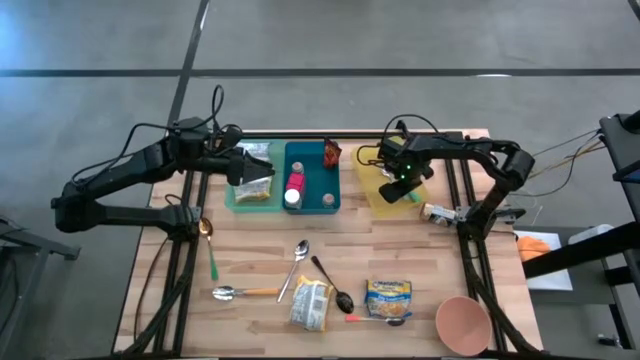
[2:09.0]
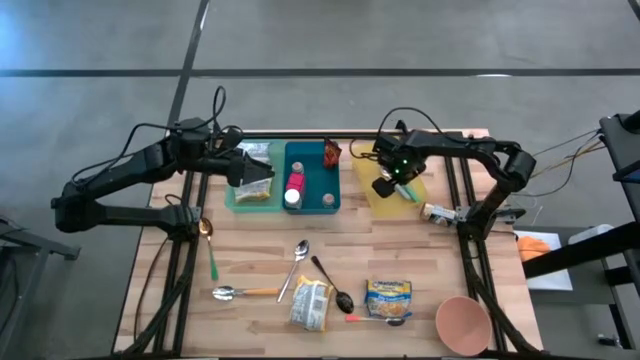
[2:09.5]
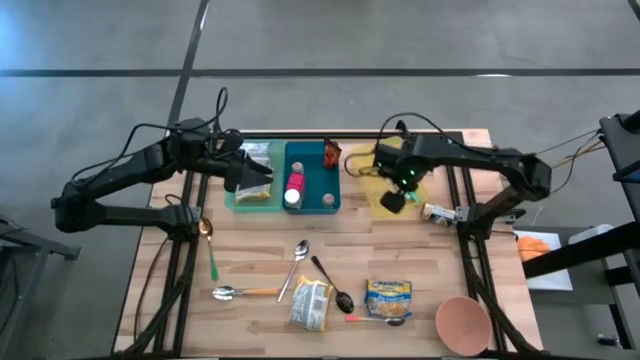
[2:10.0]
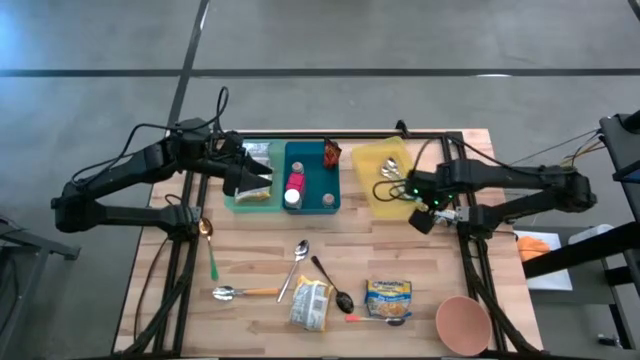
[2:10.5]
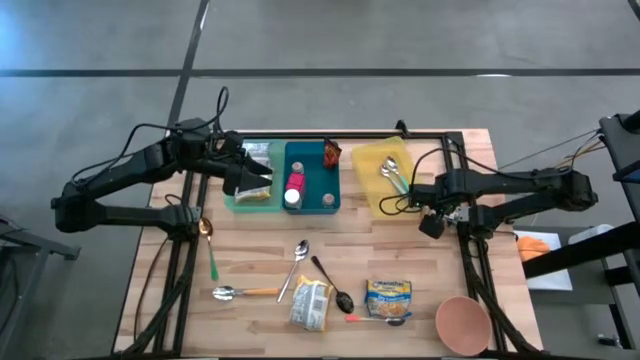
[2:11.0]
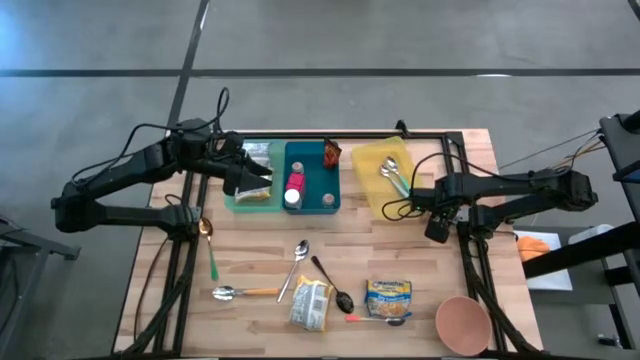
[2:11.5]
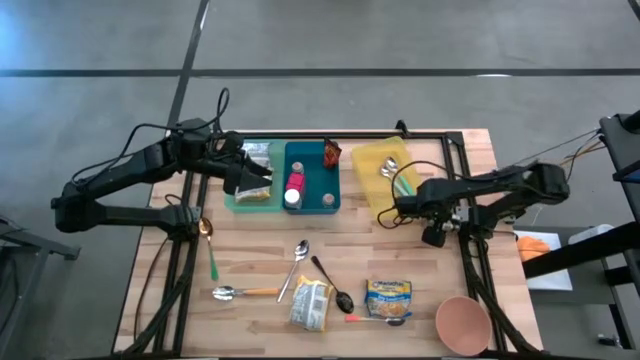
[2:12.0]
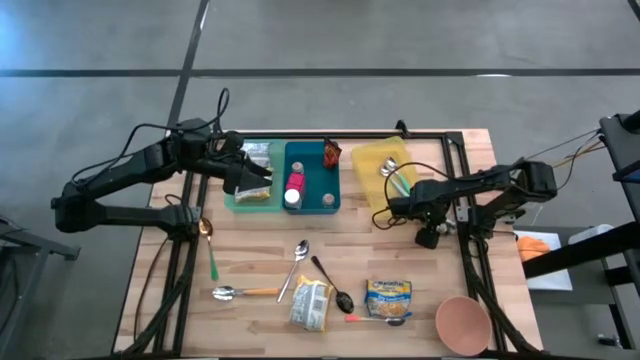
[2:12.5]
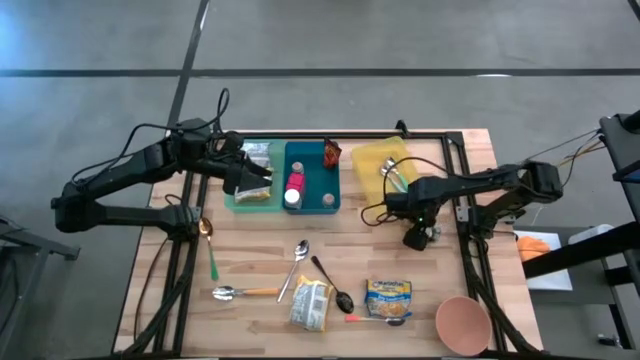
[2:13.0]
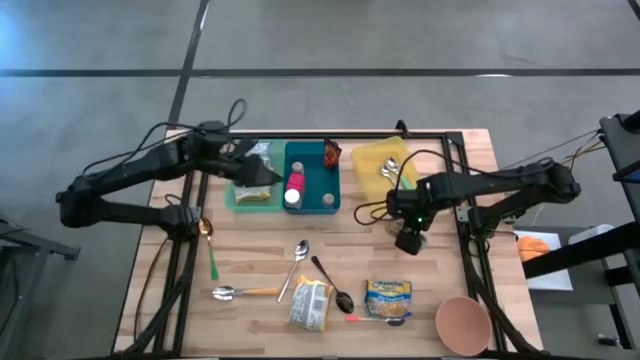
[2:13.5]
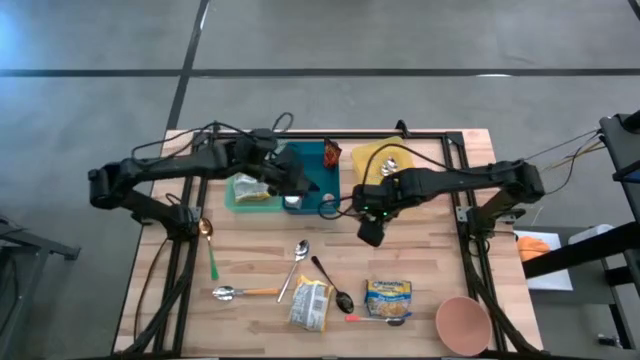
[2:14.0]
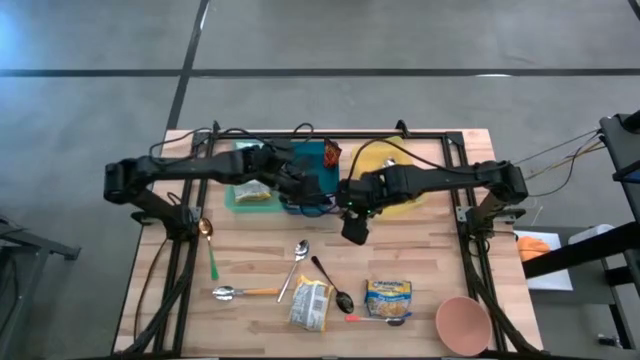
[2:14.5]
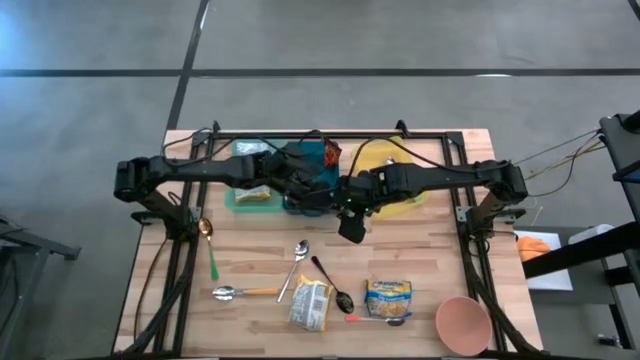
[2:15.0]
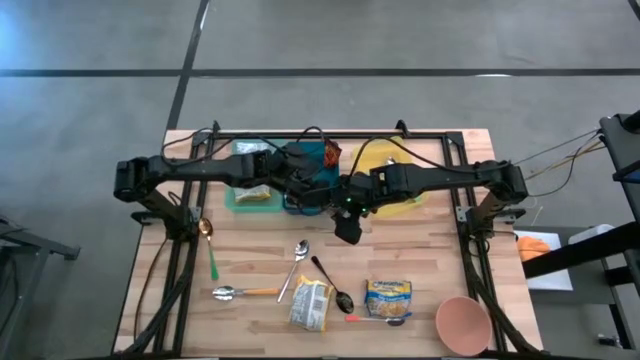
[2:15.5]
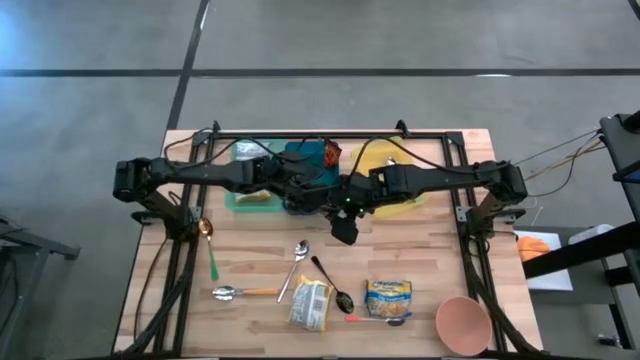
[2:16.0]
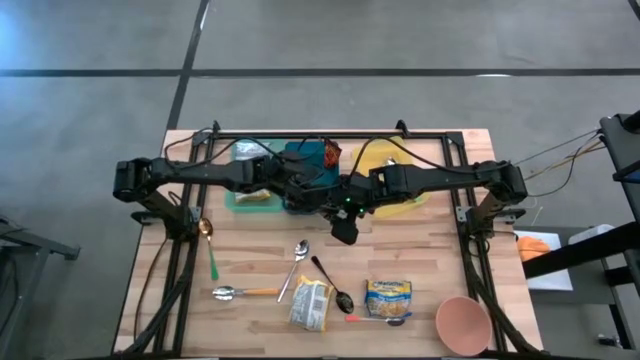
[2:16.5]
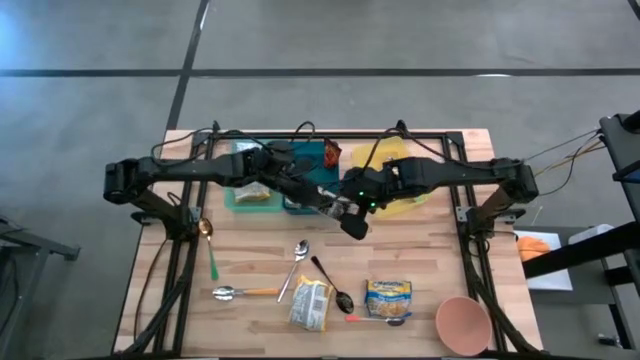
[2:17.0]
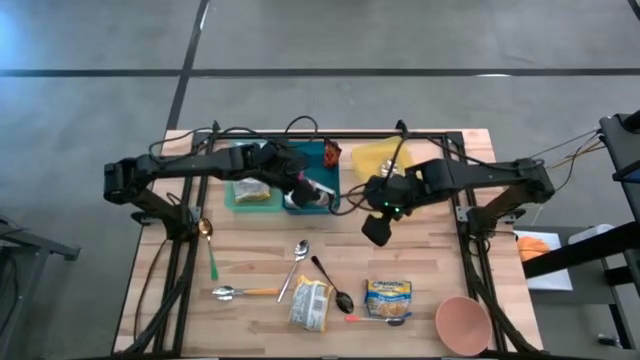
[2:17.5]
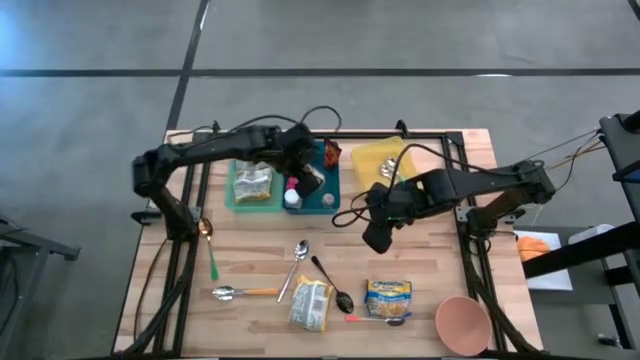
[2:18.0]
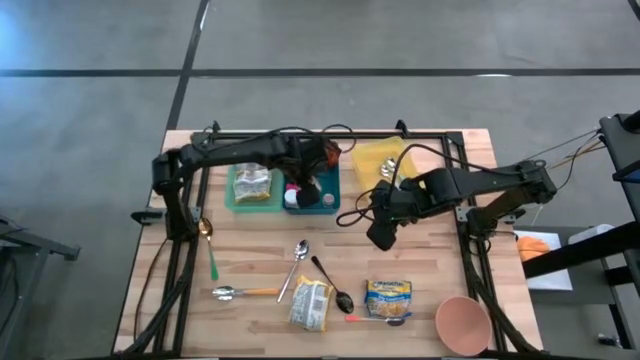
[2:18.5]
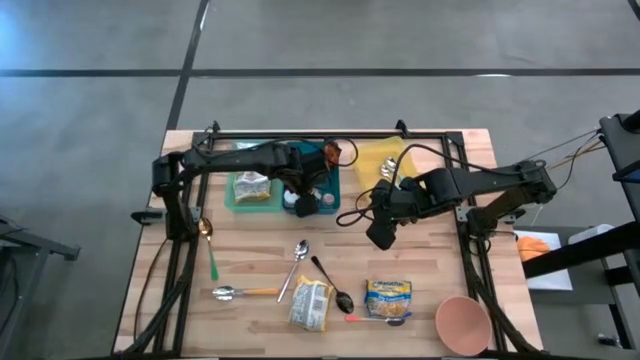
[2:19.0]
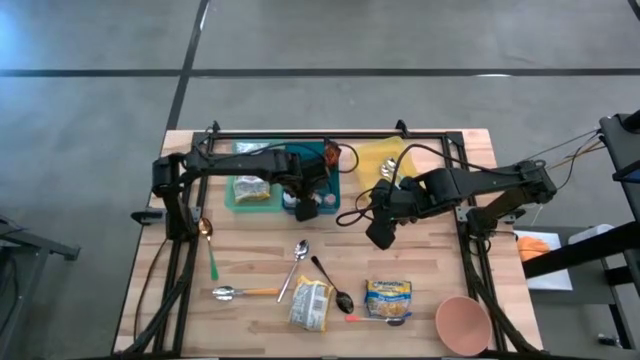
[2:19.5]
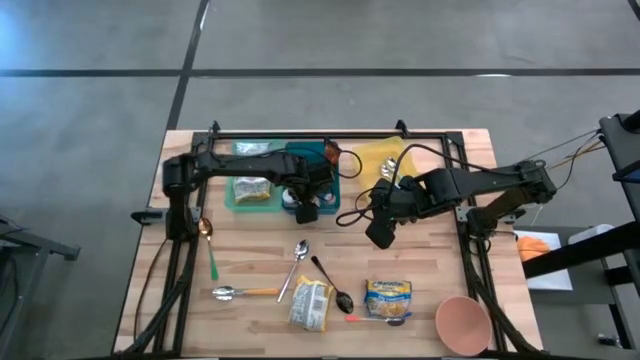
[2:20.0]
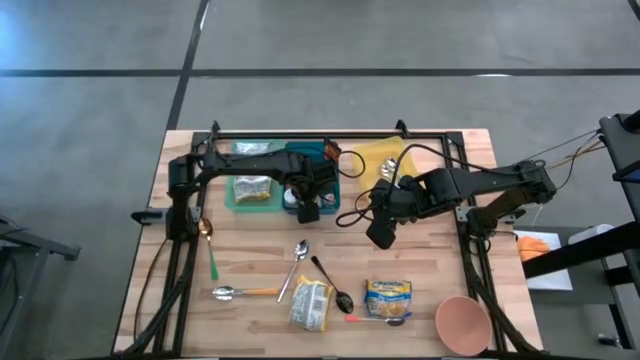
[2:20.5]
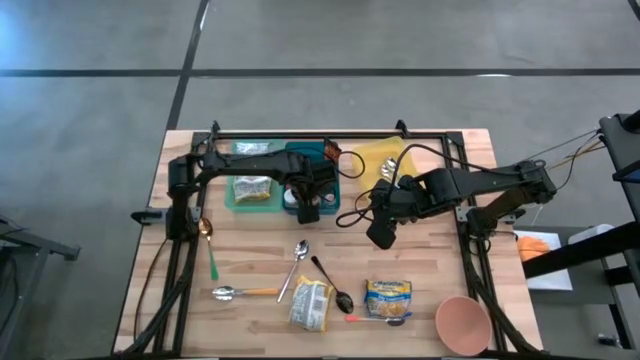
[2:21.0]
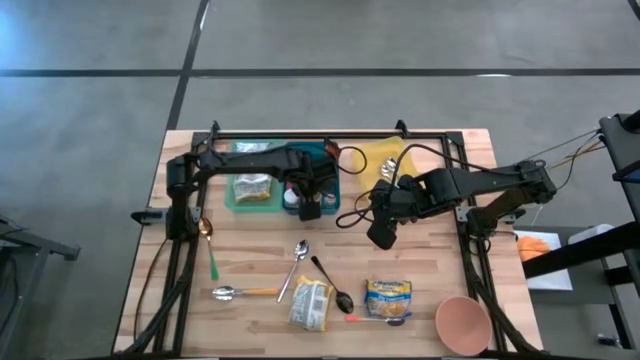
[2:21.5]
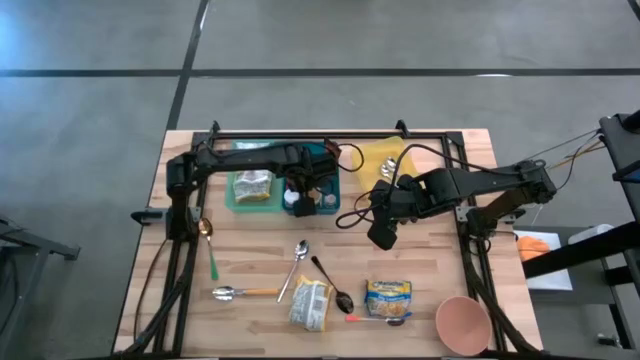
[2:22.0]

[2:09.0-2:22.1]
Put the gold seasoning bottle into the blue bin

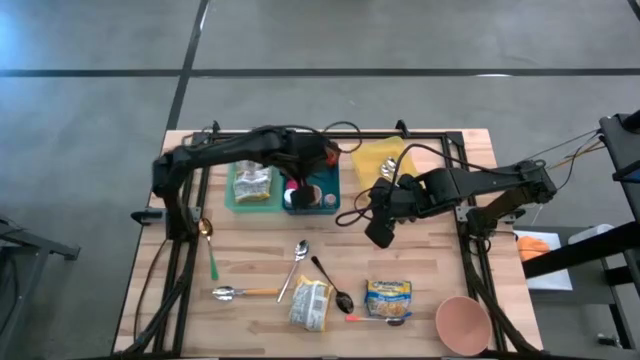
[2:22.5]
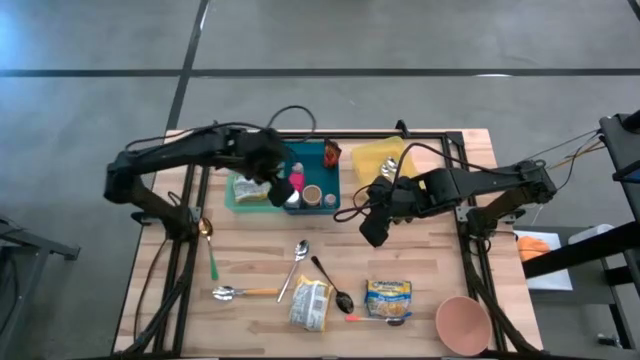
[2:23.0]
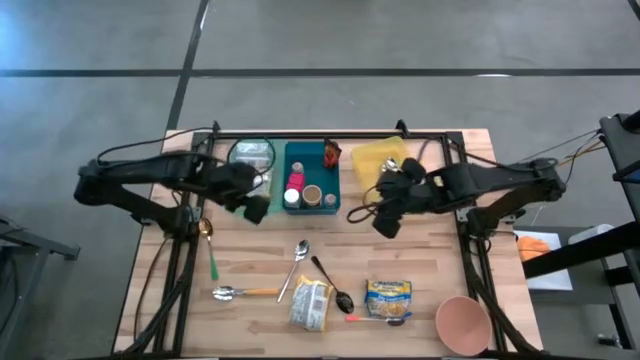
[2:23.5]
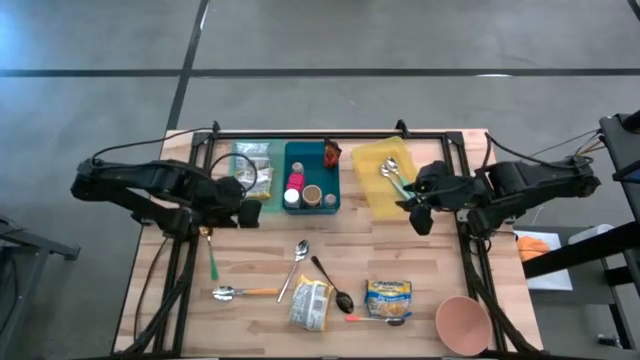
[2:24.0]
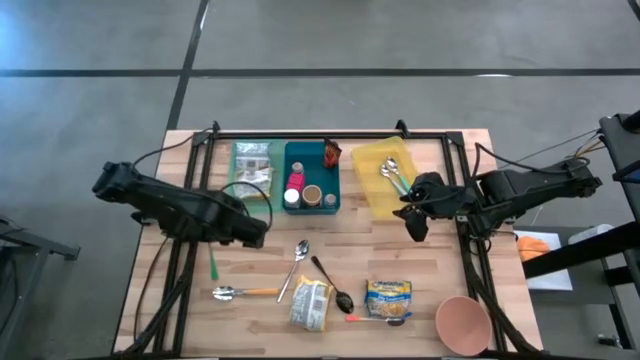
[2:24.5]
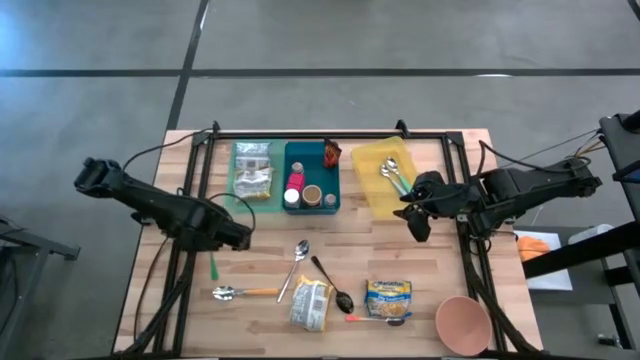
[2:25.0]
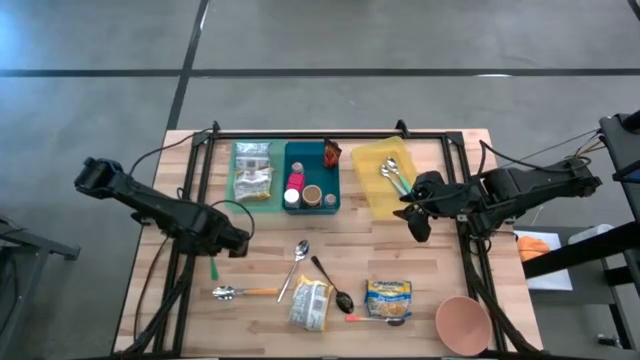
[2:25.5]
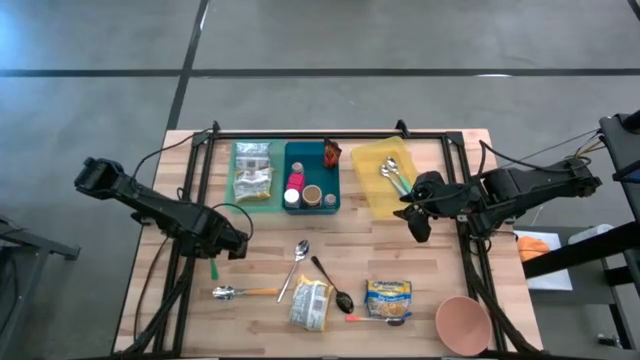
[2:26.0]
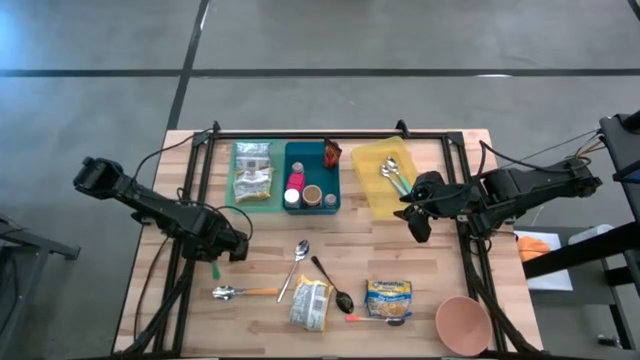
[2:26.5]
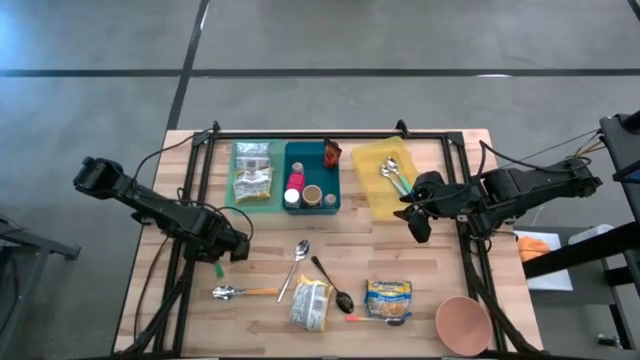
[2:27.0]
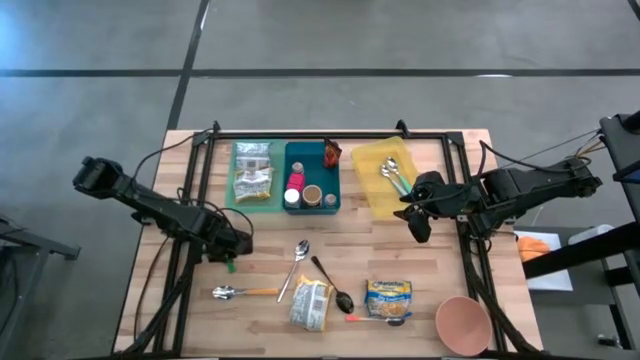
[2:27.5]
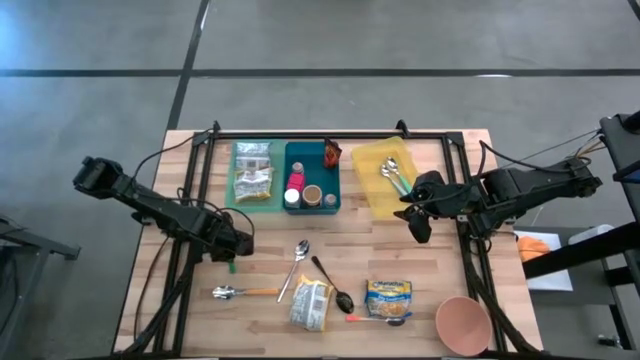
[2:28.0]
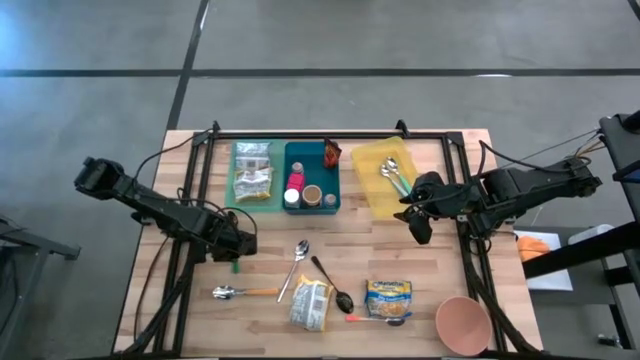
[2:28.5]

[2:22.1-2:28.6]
Put the green spoon into the yellow bin
